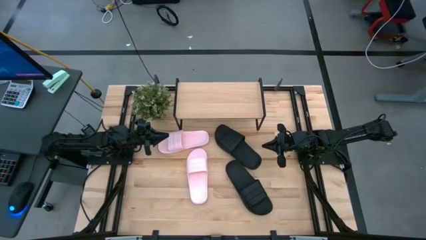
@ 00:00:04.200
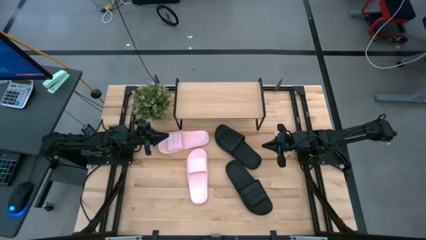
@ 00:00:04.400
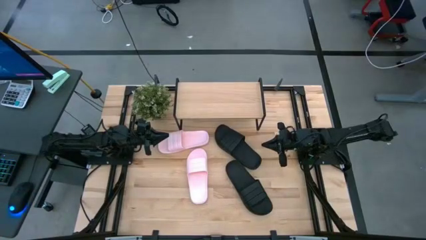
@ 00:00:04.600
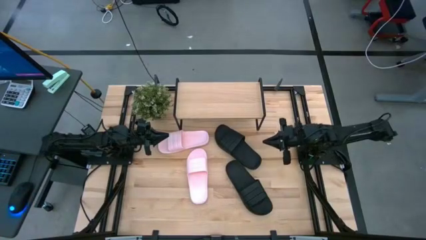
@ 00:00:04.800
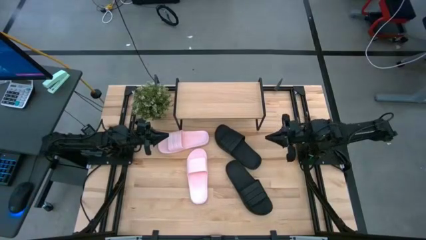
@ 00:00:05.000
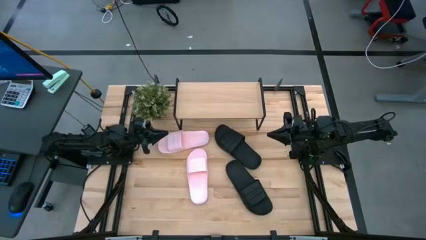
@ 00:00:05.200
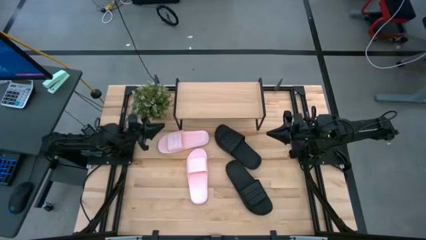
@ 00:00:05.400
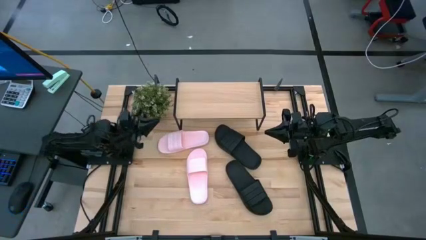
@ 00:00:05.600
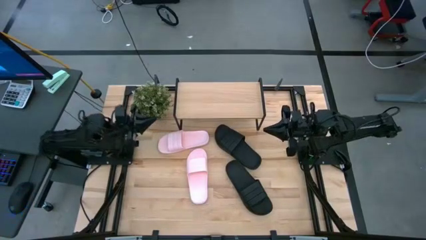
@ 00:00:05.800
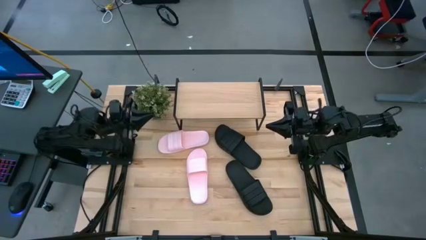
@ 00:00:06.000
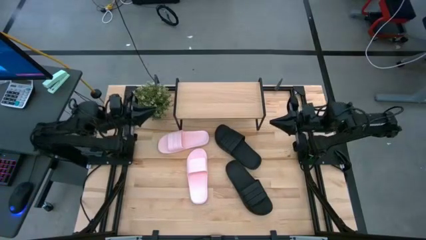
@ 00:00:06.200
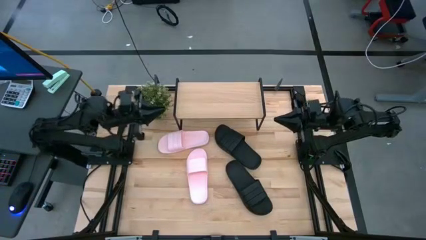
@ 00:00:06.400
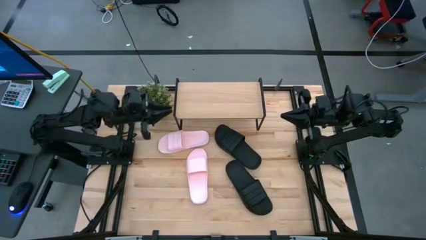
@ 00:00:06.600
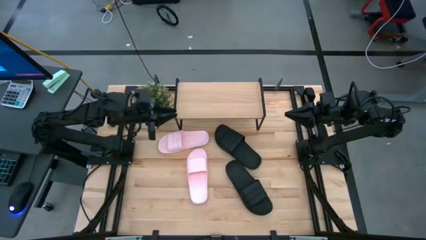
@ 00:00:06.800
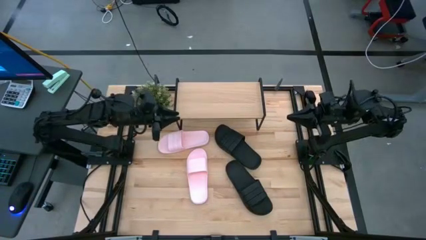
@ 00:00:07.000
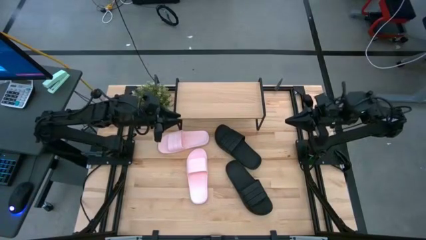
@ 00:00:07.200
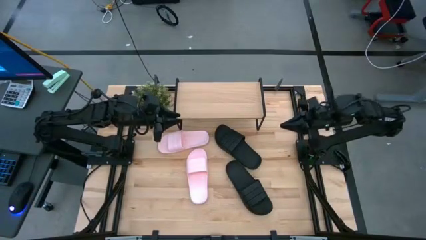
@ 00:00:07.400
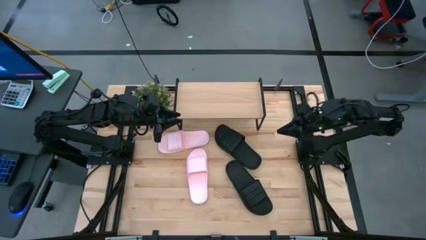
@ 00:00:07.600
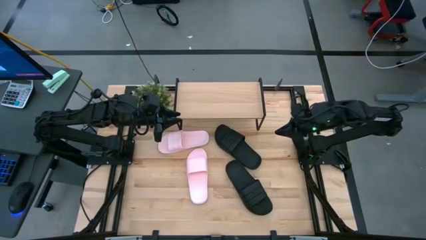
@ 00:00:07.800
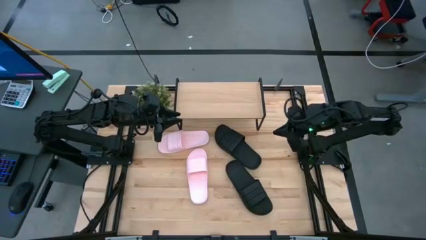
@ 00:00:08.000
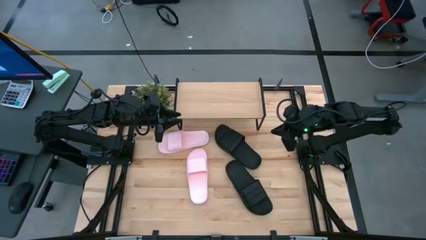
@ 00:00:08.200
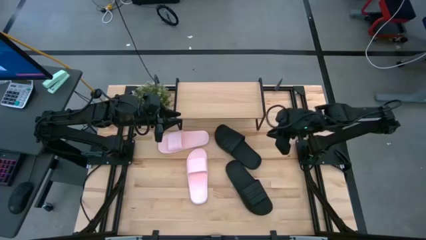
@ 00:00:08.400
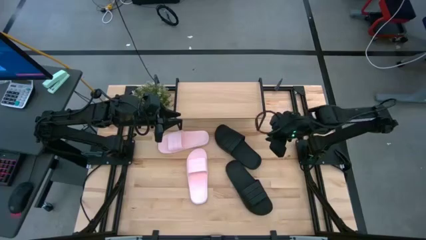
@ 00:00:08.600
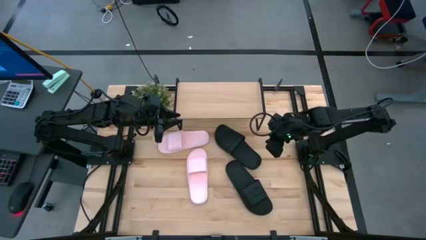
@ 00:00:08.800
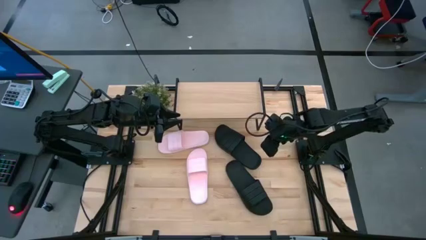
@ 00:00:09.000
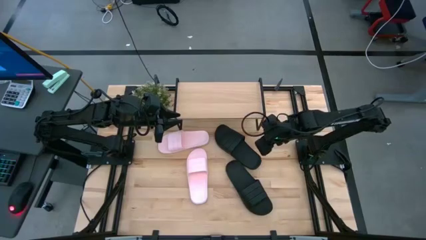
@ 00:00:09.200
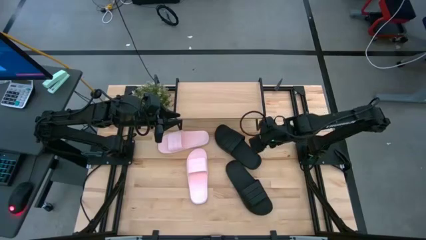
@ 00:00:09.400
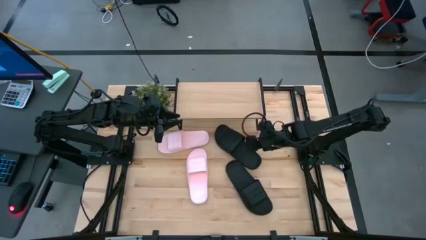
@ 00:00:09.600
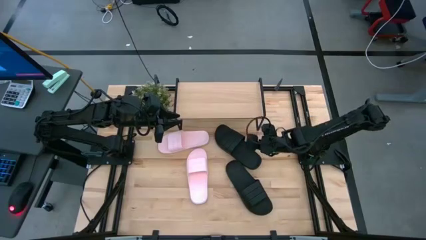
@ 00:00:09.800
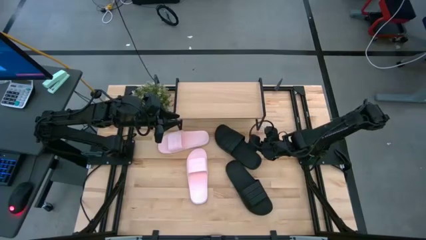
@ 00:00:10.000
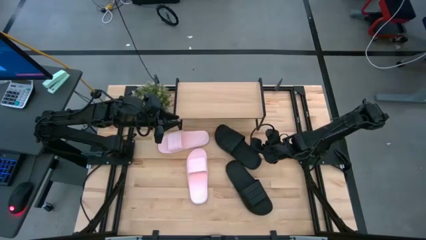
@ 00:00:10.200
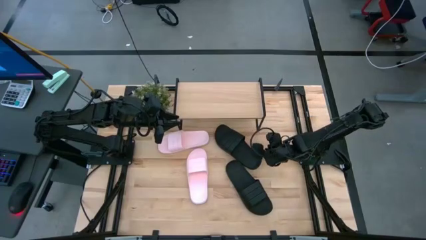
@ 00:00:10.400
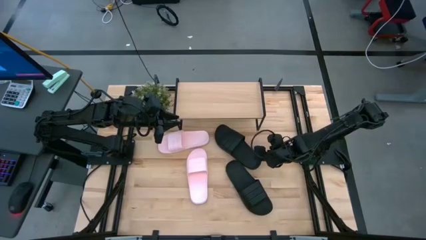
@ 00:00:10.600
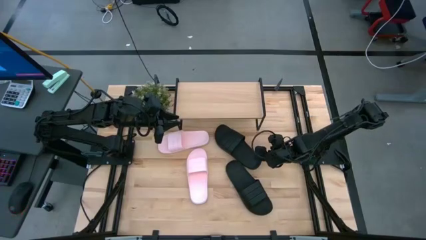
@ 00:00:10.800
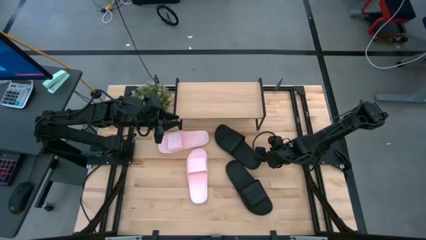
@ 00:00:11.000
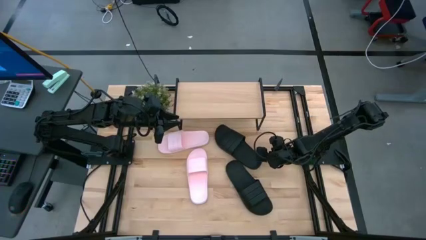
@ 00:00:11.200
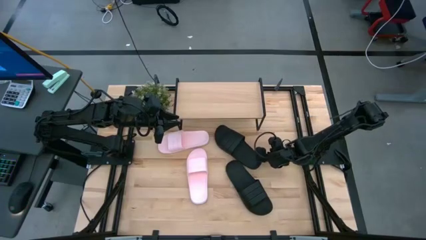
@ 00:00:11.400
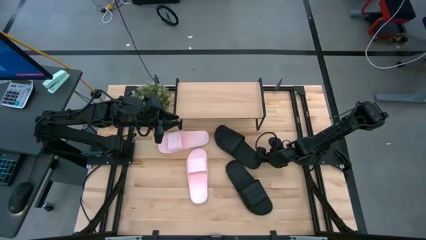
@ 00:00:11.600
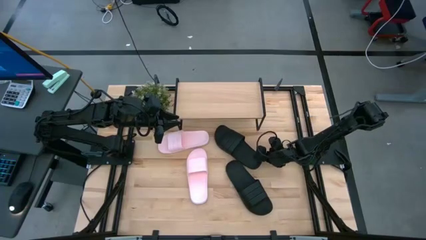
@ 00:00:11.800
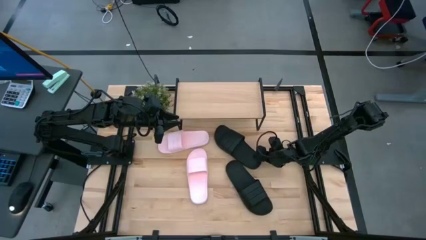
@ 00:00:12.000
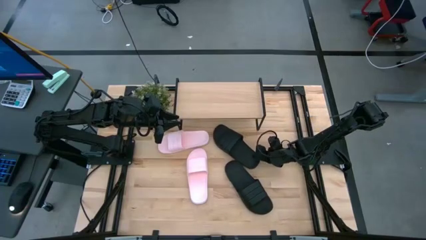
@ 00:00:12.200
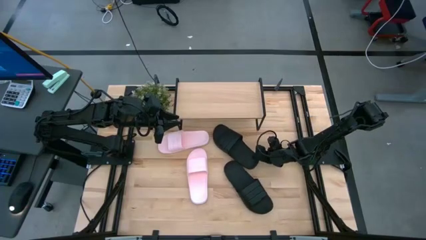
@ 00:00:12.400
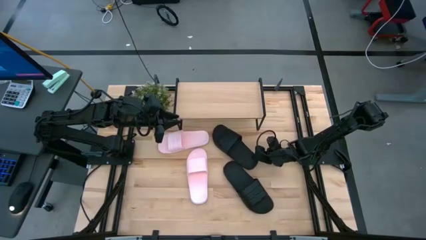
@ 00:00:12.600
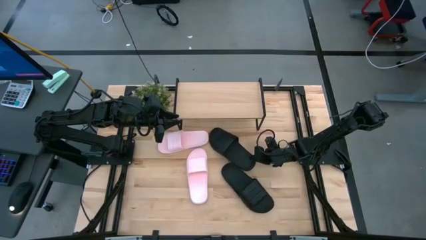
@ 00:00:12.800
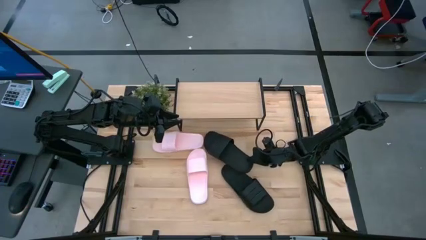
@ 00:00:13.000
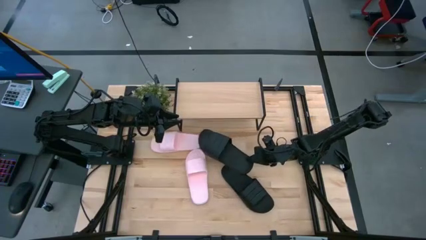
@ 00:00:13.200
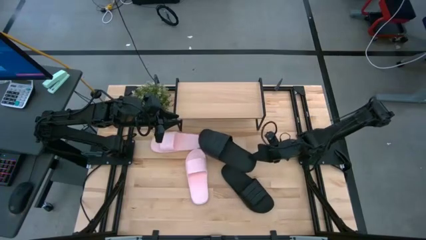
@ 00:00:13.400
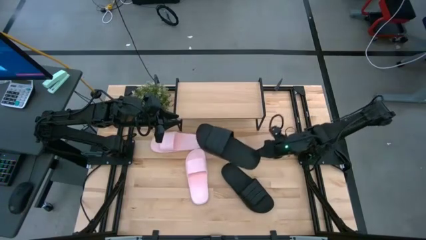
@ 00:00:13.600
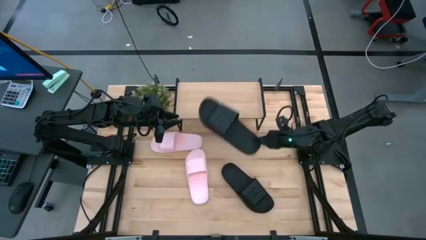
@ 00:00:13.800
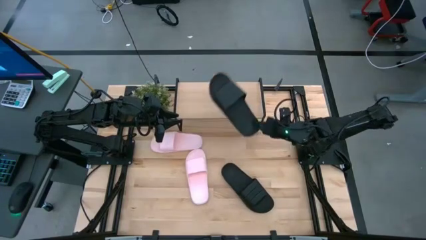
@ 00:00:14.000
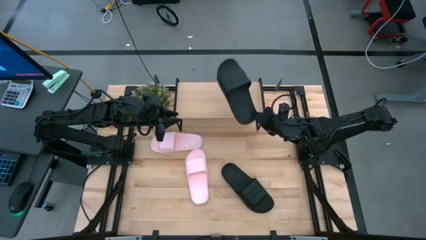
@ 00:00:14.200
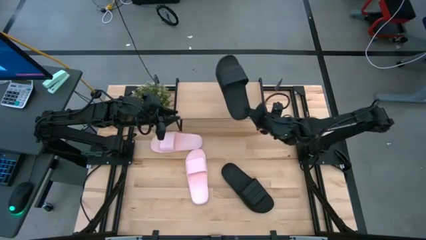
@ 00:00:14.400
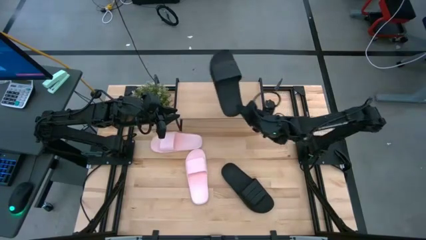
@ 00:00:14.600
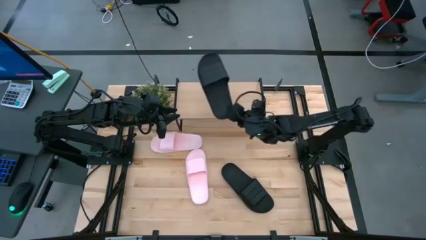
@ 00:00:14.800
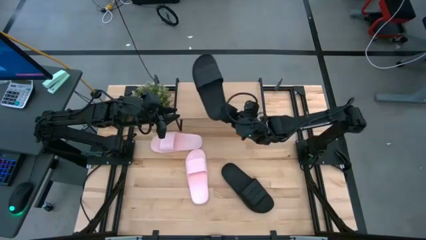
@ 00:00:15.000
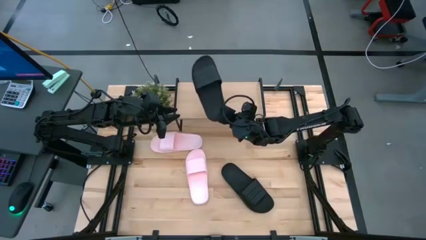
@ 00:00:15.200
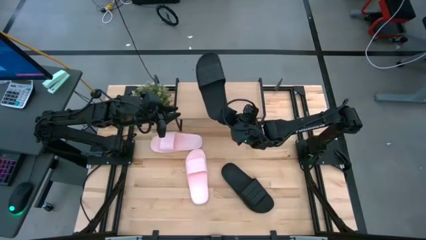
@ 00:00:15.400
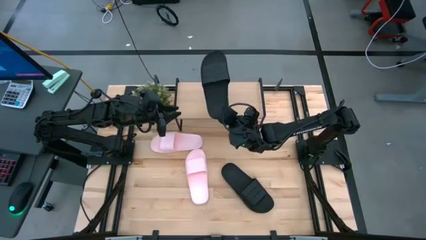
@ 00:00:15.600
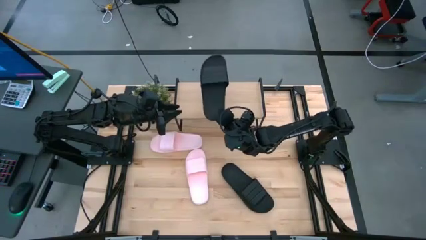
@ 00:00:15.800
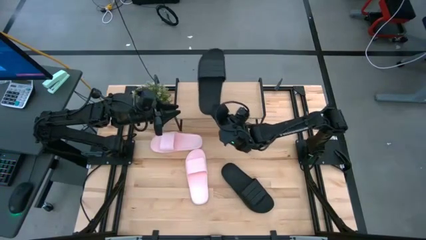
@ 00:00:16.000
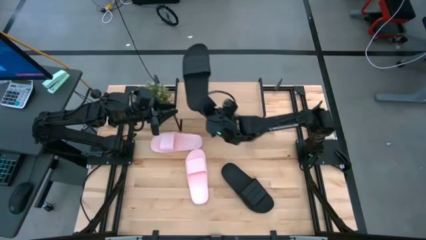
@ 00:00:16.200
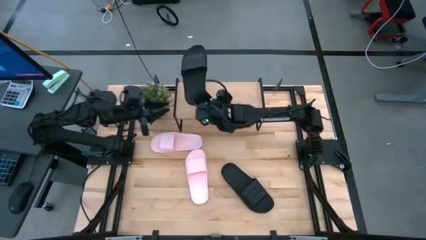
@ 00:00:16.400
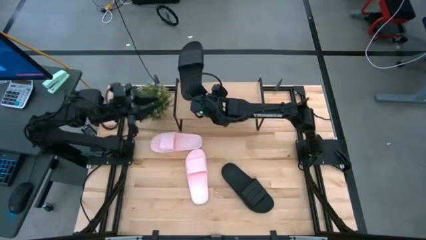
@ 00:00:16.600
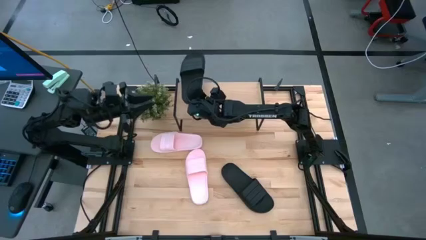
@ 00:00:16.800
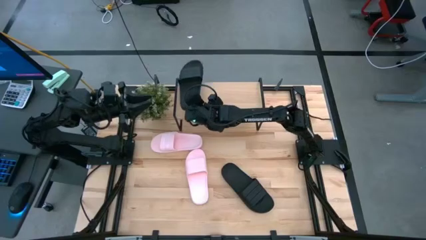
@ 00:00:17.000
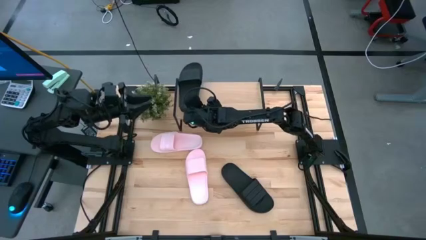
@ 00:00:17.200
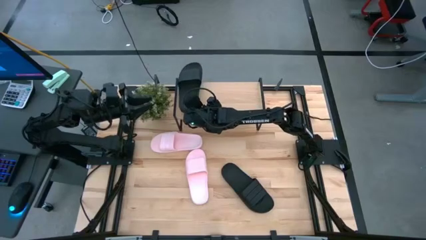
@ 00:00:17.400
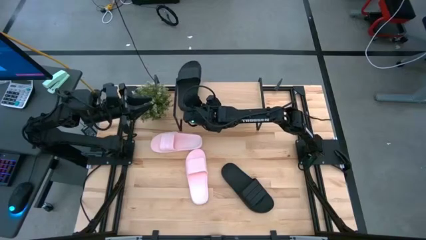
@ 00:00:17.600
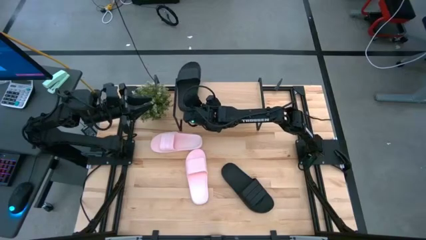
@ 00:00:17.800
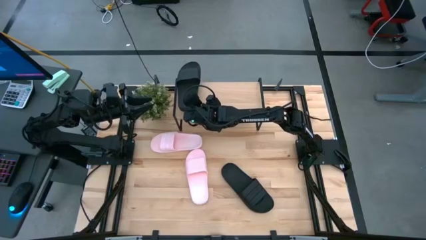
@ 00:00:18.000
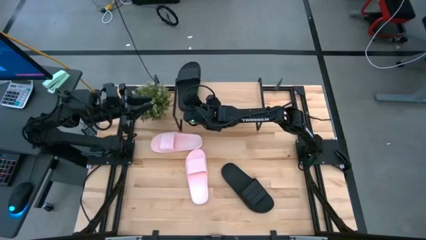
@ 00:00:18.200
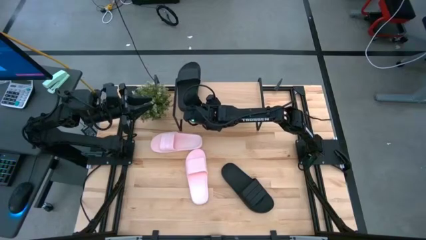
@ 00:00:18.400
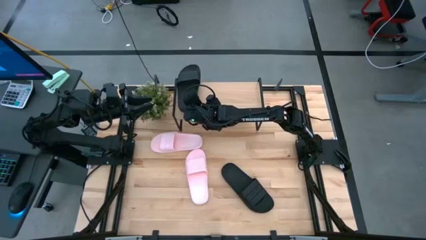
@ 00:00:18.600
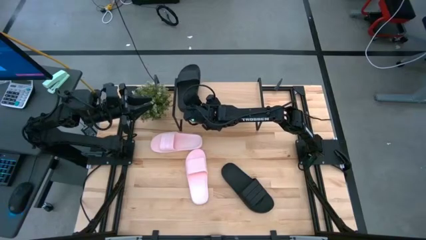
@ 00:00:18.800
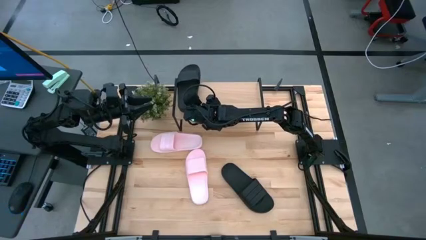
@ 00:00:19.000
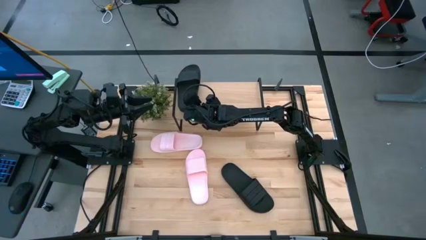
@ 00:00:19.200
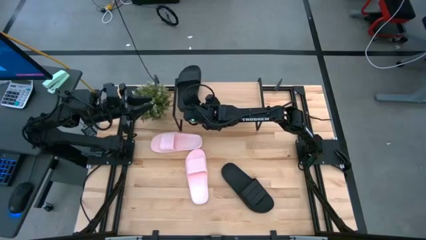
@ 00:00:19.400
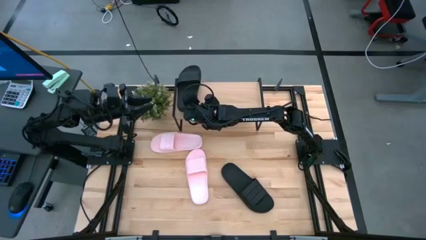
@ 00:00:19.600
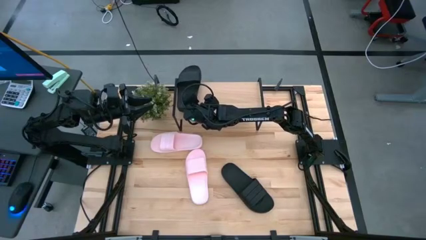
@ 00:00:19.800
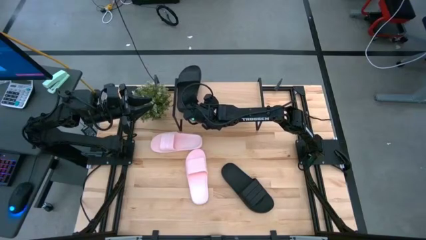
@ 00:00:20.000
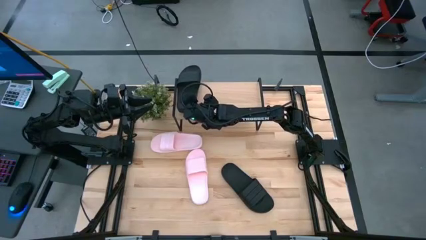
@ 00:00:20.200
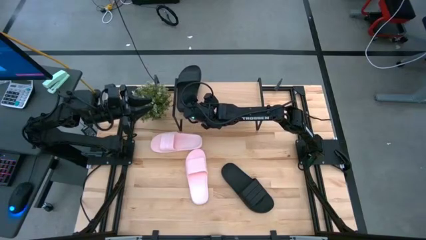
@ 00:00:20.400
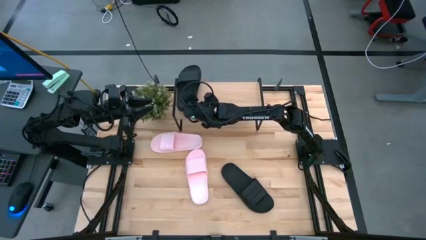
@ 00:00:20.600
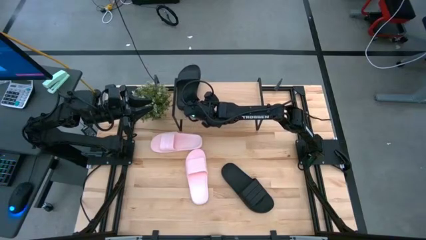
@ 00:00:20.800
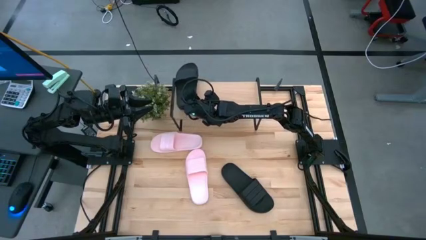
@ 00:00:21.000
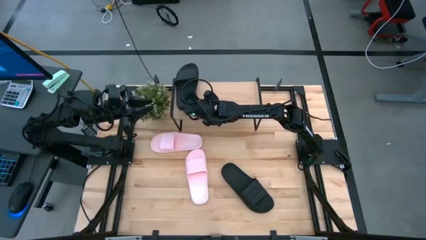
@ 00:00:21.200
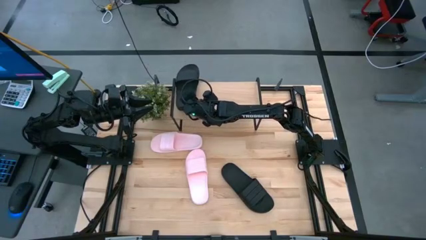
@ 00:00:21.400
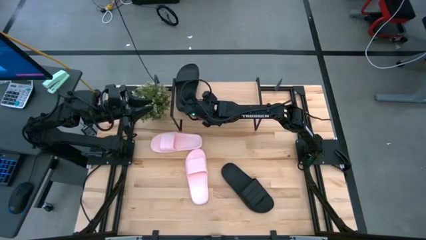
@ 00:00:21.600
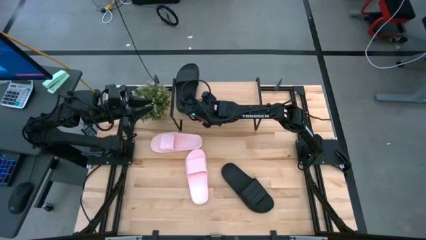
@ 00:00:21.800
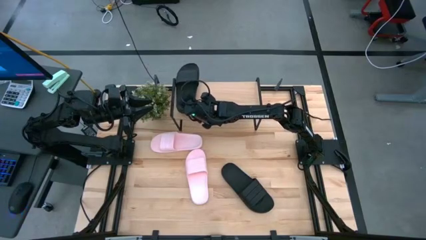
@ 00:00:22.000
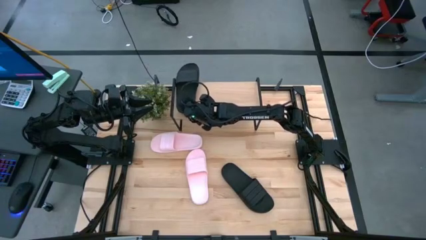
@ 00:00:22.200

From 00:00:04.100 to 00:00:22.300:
Task: Pick and place slides into the shelf
Put the top black slide on the shelf
